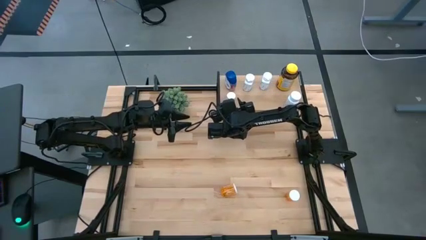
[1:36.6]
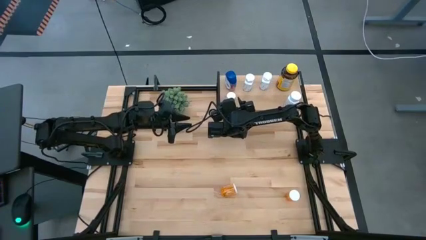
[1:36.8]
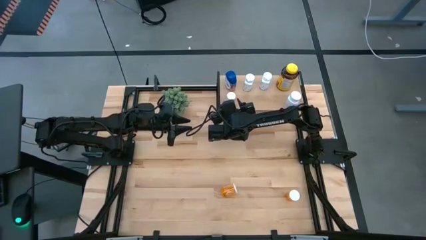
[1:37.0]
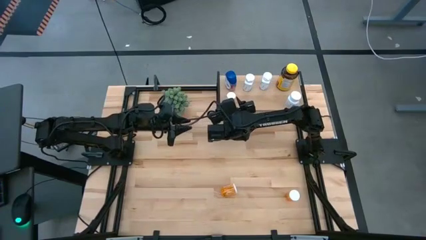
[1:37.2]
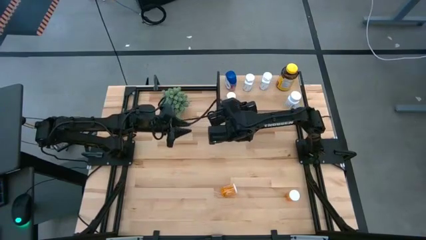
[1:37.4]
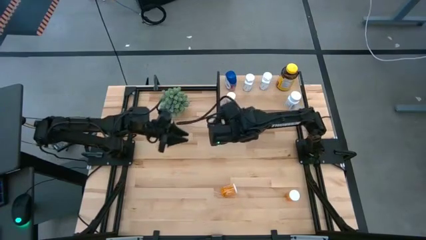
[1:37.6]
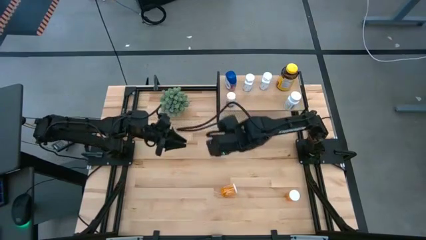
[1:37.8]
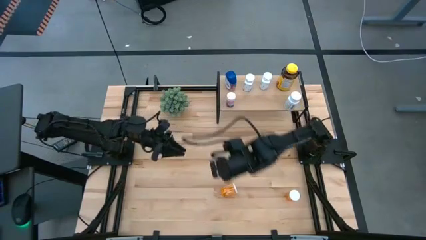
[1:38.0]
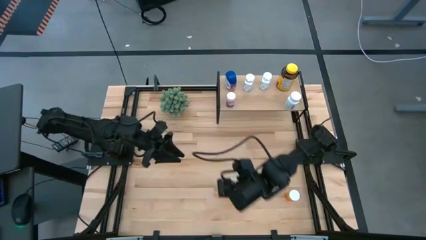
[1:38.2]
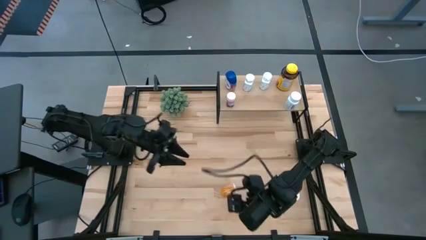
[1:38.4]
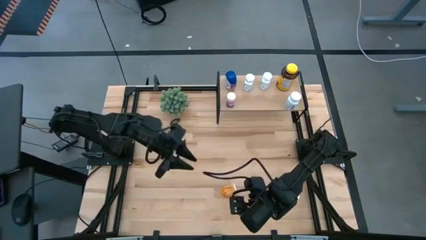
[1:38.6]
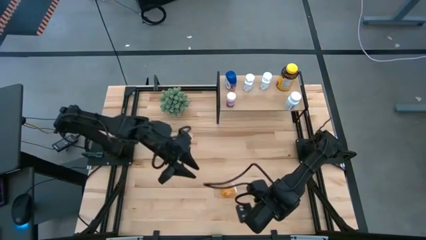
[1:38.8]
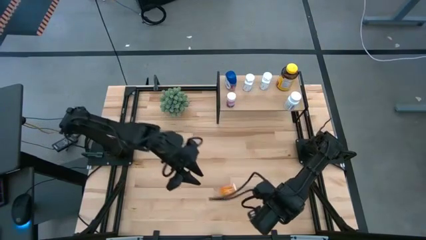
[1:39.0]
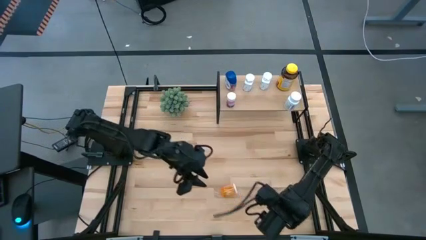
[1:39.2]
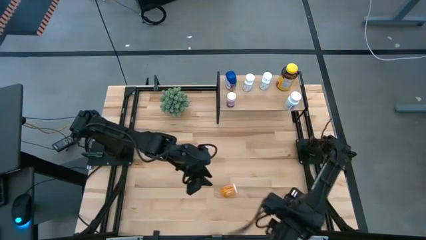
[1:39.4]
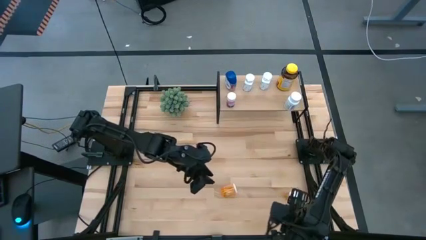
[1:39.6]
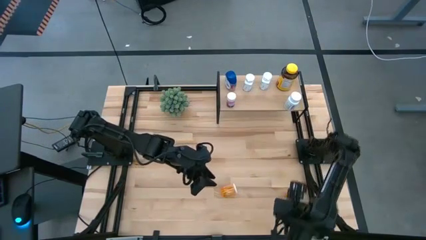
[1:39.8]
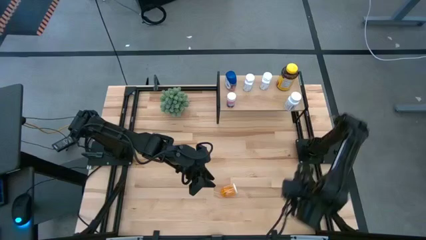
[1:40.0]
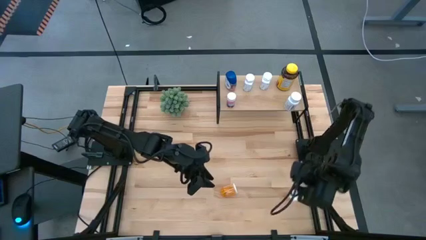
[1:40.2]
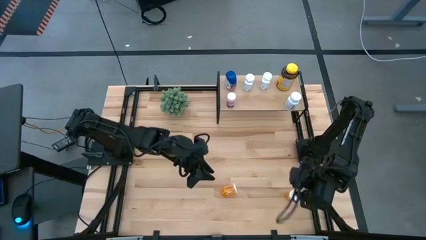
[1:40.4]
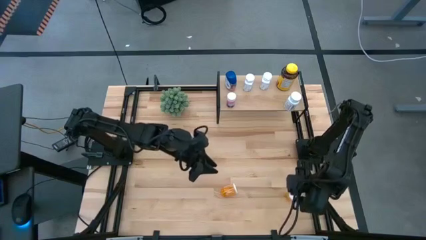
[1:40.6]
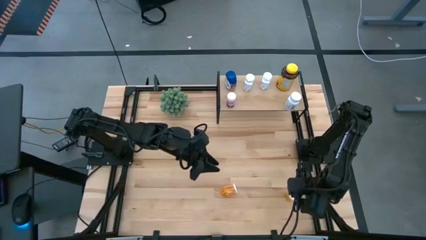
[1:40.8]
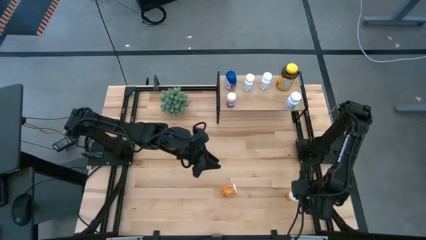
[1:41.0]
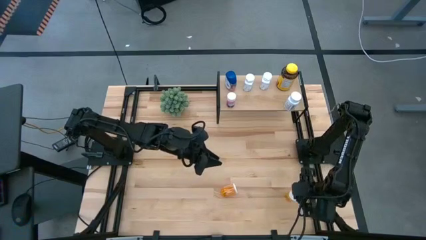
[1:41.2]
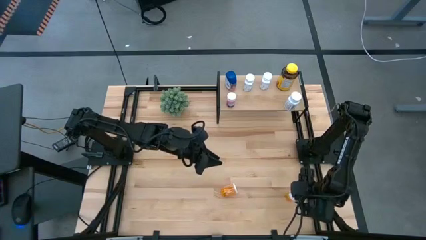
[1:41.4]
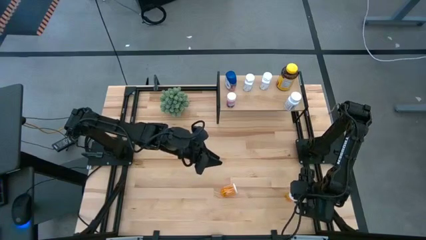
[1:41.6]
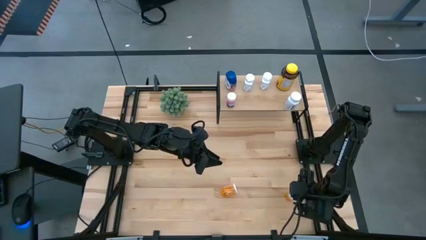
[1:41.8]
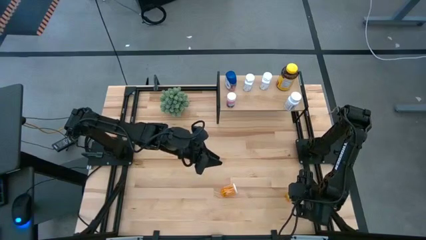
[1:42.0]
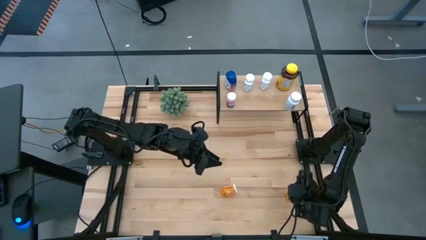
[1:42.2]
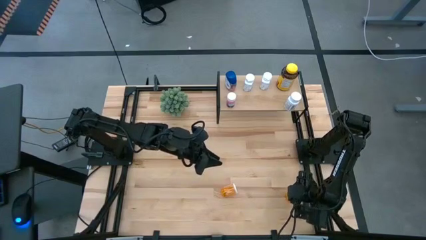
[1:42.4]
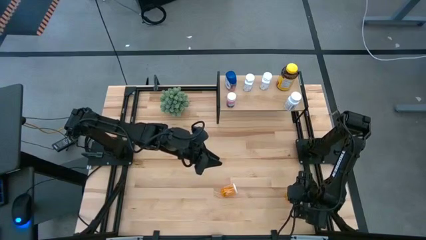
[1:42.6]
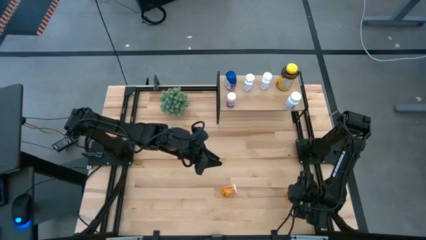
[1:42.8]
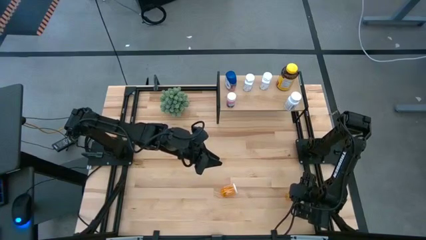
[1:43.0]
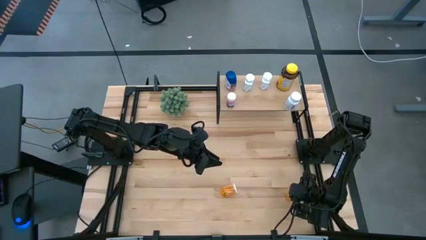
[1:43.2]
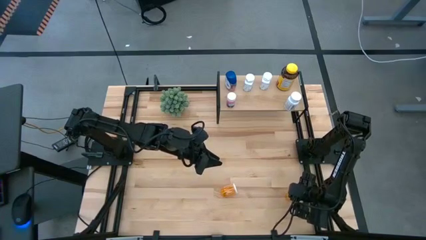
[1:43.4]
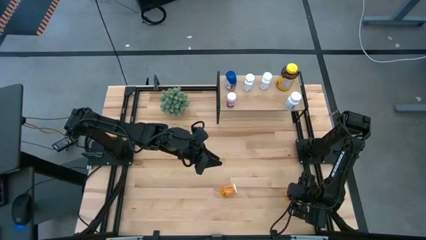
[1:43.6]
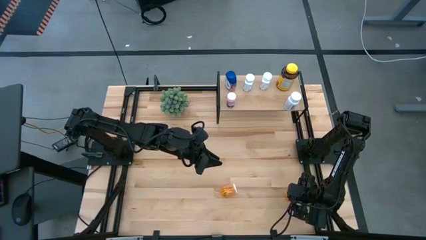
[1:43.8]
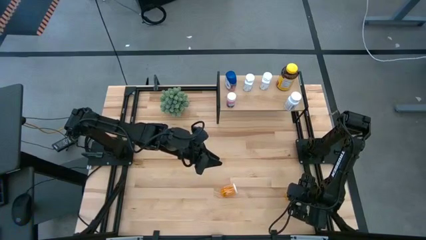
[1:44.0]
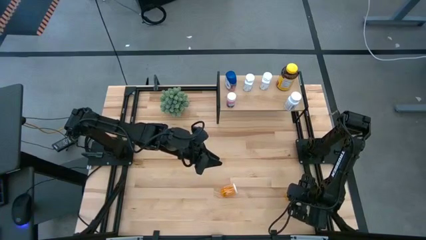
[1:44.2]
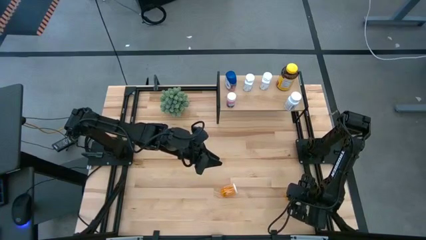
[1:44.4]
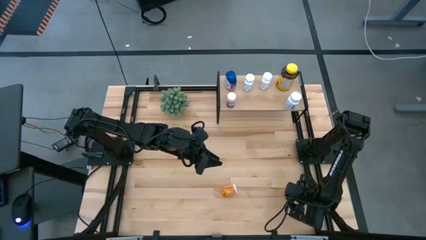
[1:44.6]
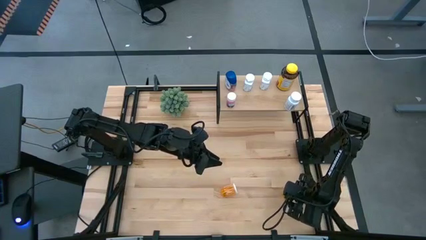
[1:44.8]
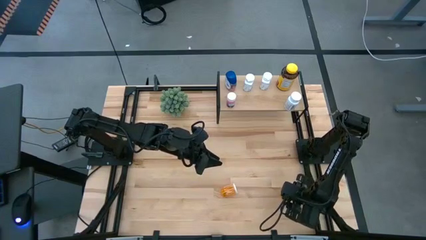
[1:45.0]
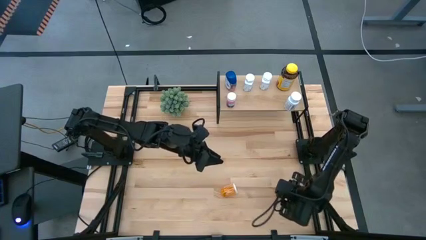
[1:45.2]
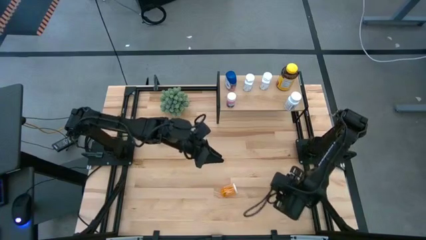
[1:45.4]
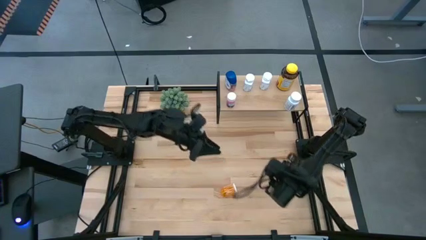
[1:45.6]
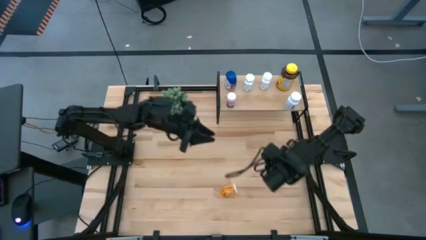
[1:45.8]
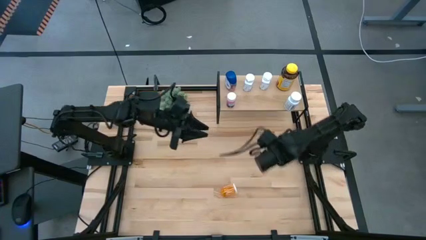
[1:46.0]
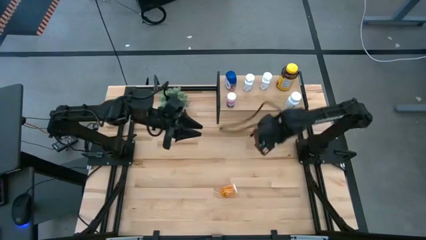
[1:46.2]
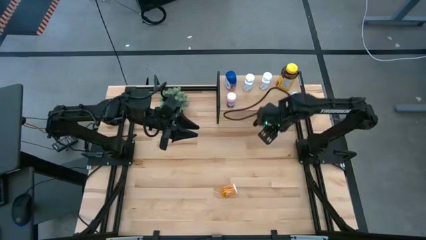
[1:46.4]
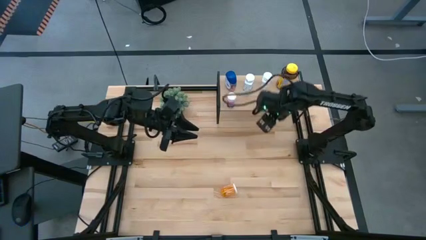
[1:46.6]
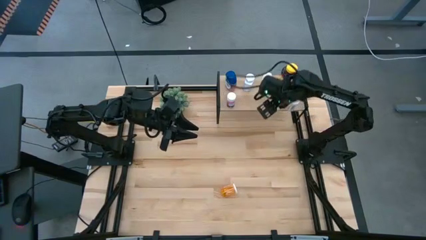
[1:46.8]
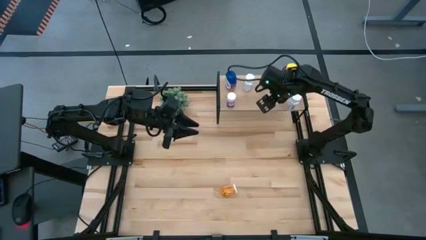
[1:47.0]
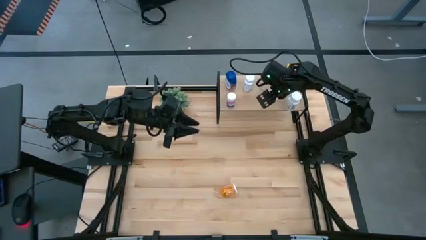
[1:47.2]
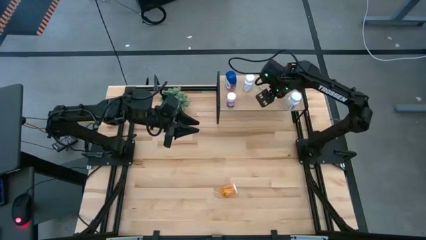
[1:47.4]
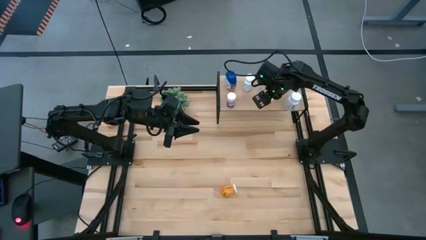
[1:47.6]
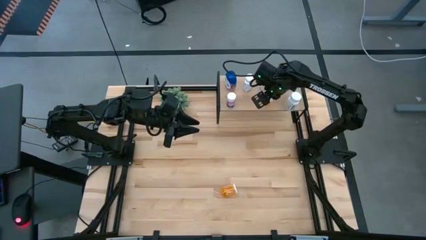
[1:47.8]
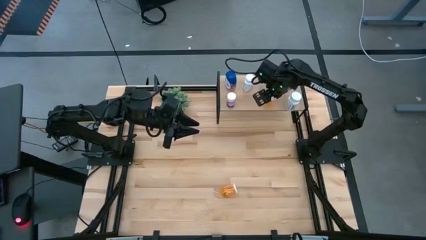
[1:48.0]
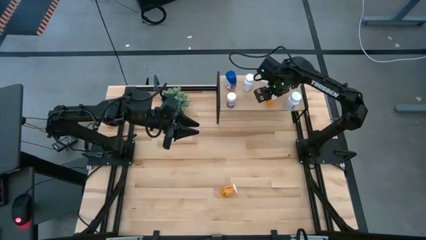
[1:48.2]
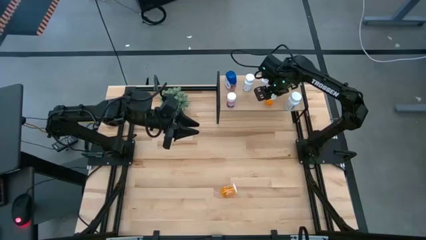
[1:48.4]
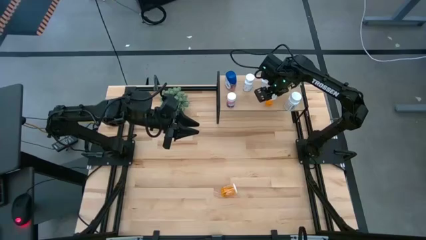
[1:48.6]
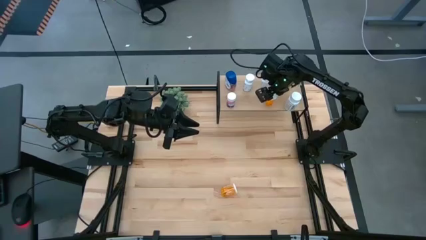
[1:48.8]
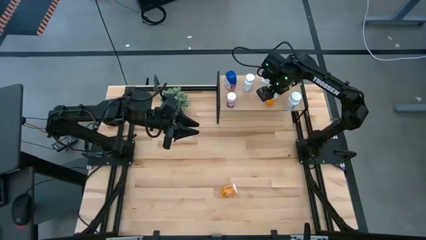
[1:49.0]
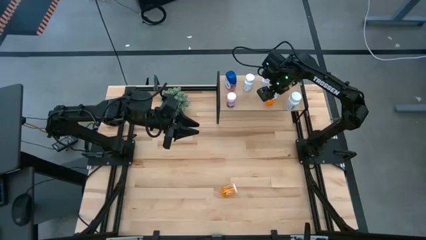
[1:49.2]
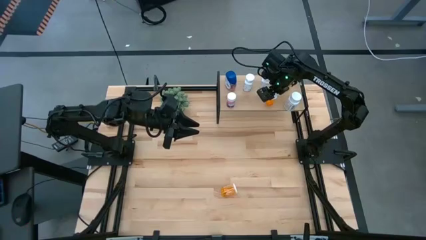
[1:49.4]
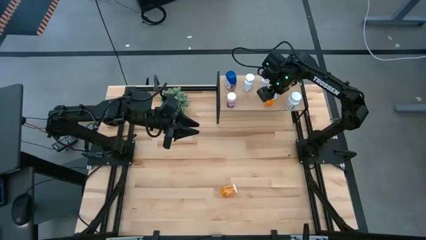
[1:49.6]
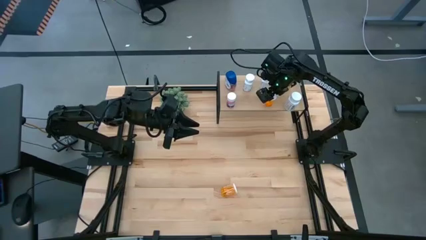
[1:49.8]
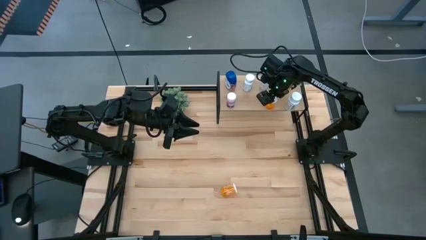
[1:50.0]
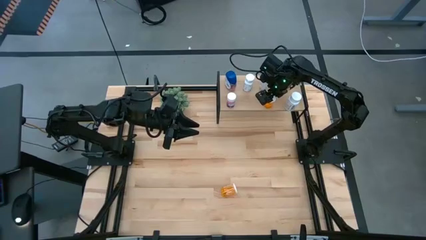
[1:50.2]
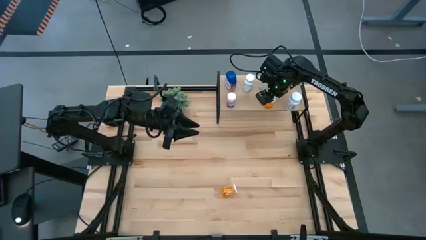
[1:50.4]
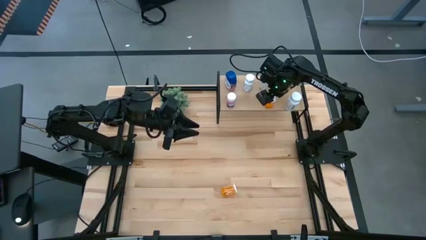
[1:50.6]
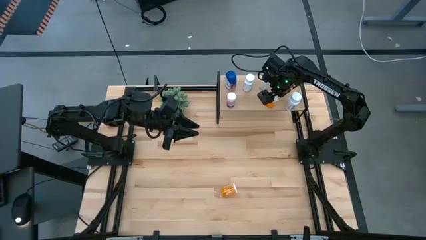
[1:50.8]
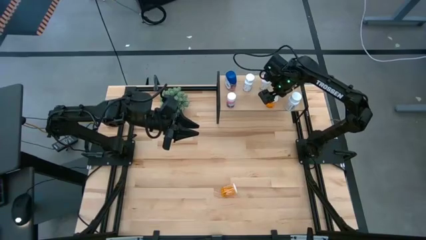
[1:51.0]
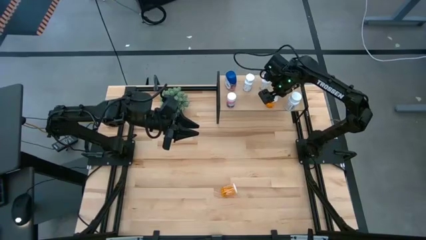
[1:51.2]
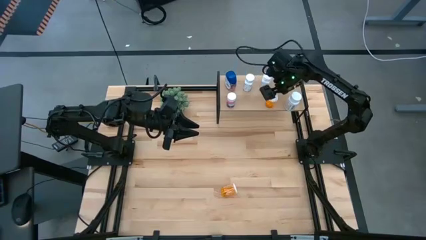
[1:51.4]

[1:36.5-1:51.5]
Task: Pick and place medicine bottles onto shelf by color
Put the right orange medicine bottle on the shelf

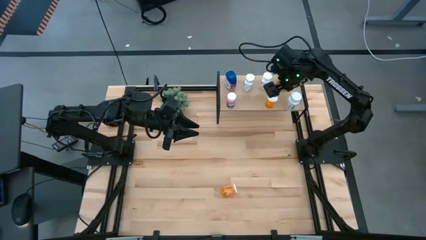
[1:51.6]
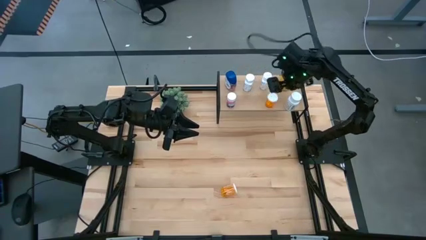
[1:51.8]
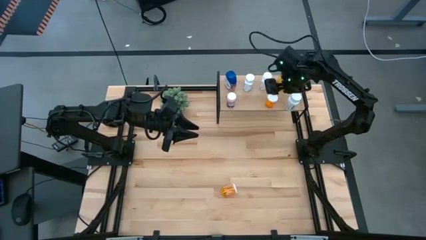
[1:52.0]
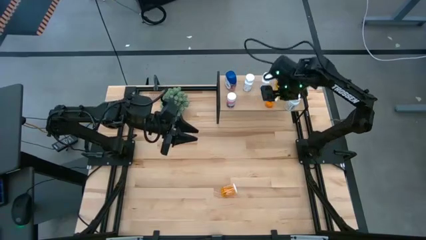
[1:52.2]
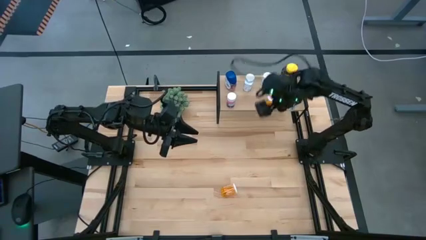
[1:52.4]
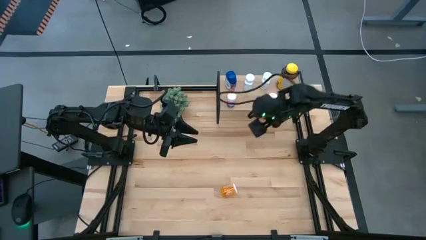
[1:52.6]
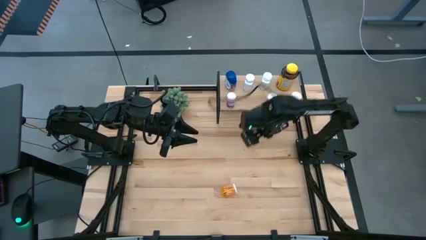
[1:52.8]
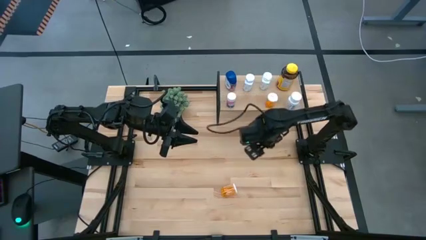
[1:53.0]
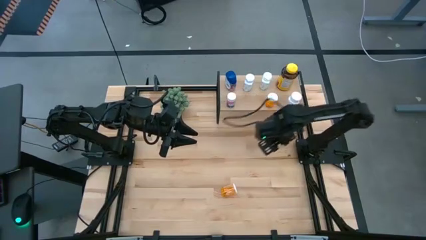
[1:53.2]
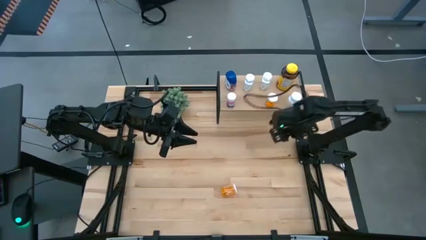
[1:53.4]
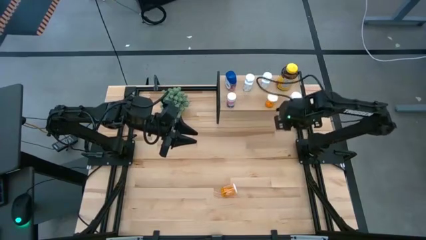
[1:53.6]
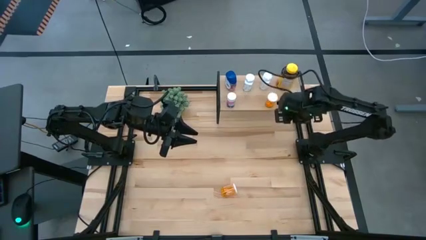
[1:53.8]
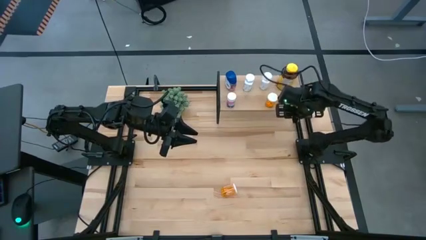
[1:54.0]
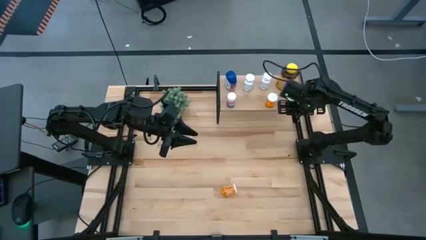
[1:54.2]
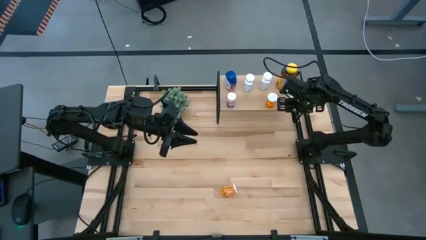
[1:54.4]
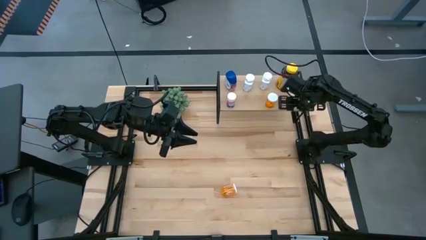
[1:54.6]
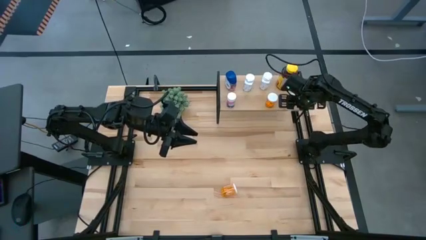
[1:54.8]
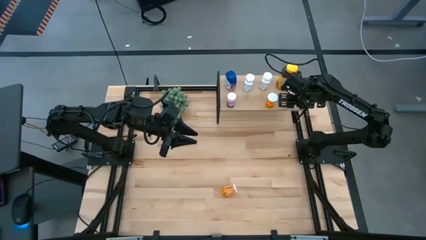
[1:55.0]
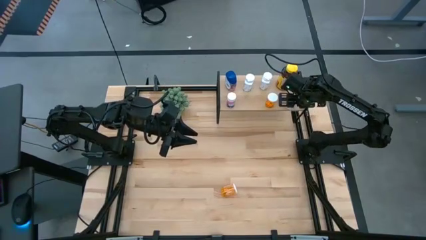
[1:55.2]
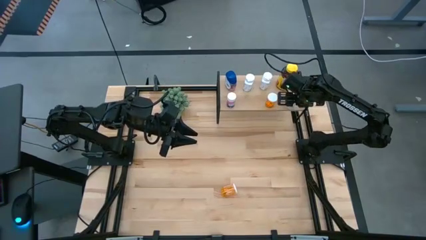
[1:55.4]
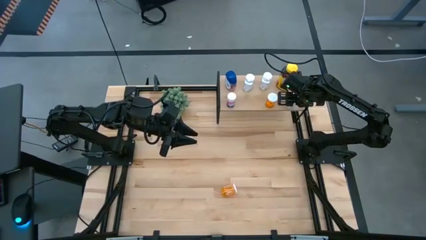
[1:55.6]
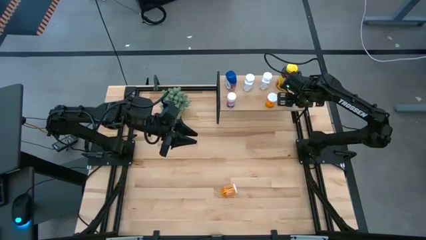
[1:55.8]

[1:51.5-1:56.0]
Adjust the white and black medicine bottle on the shelf
